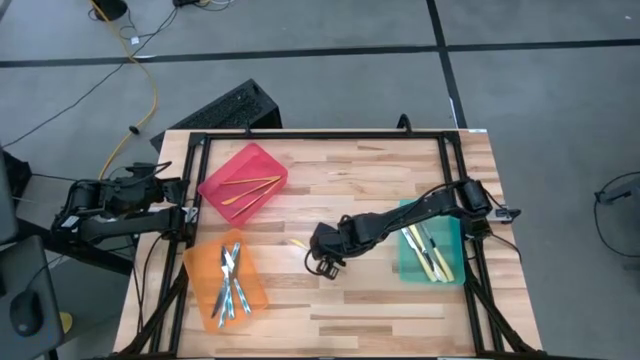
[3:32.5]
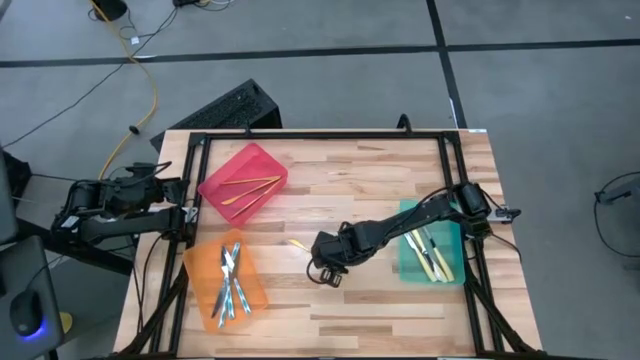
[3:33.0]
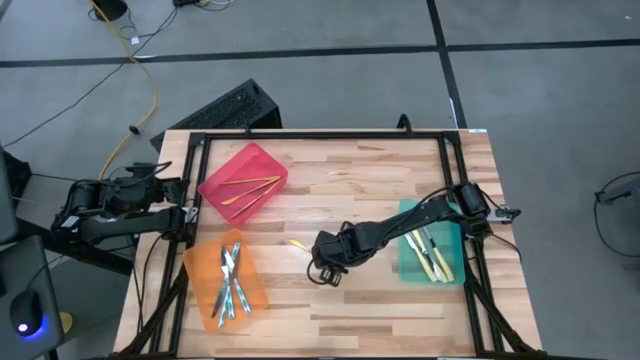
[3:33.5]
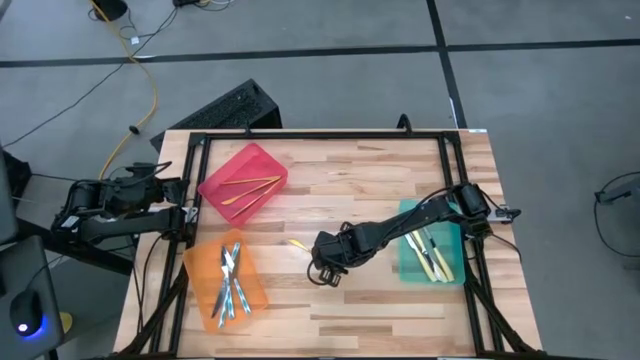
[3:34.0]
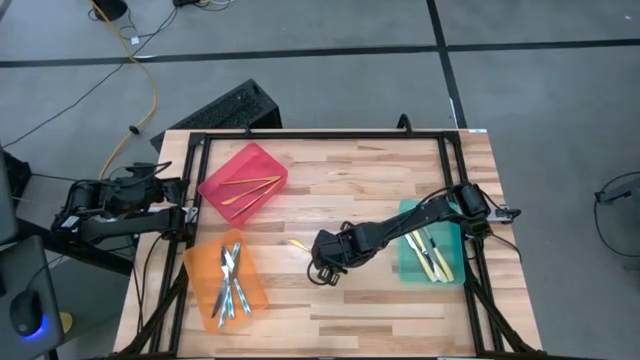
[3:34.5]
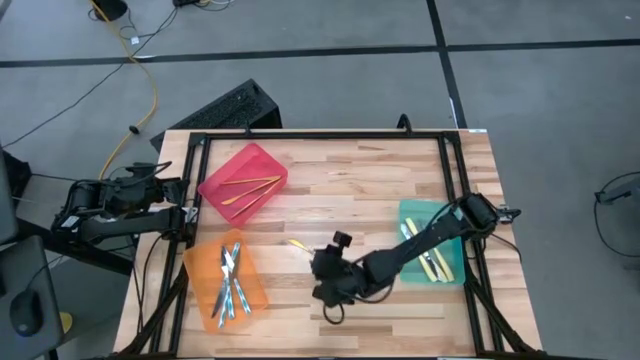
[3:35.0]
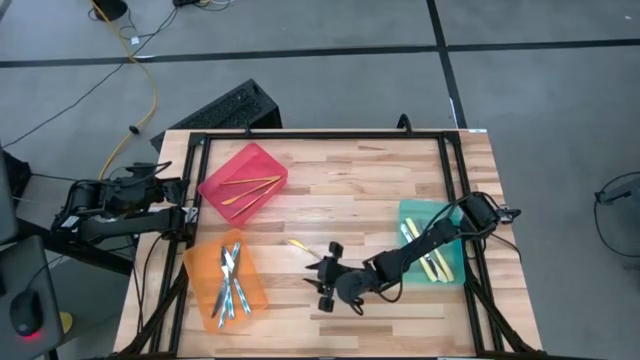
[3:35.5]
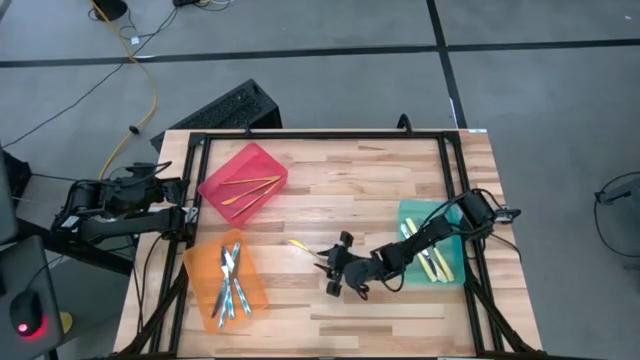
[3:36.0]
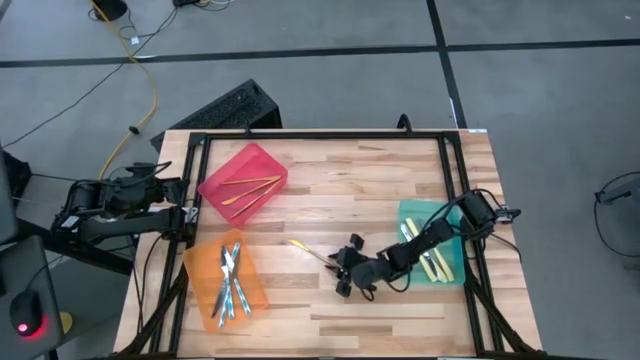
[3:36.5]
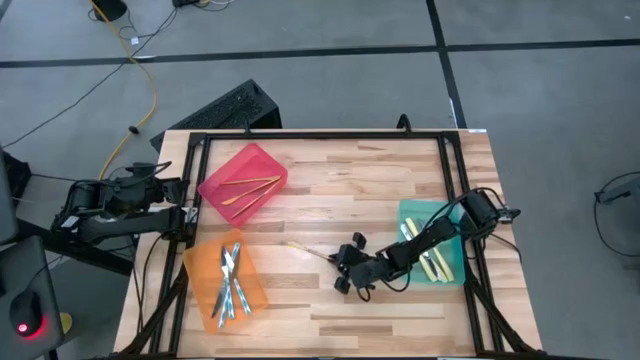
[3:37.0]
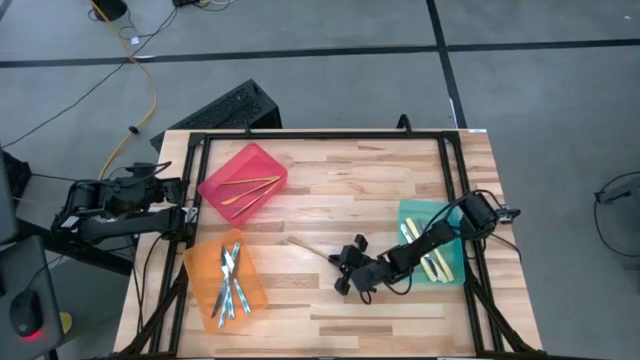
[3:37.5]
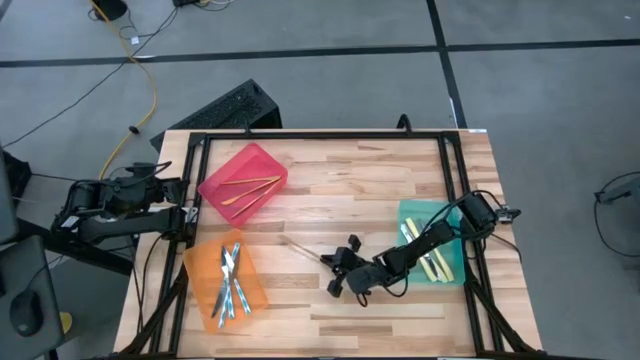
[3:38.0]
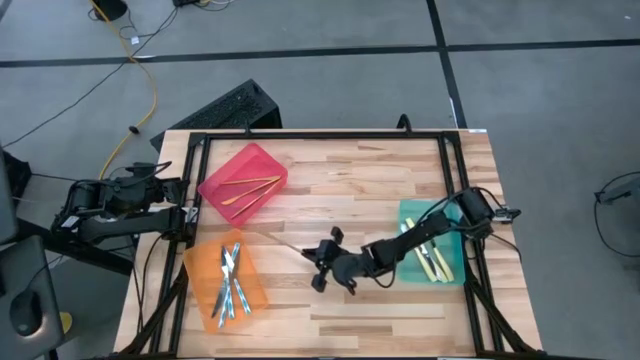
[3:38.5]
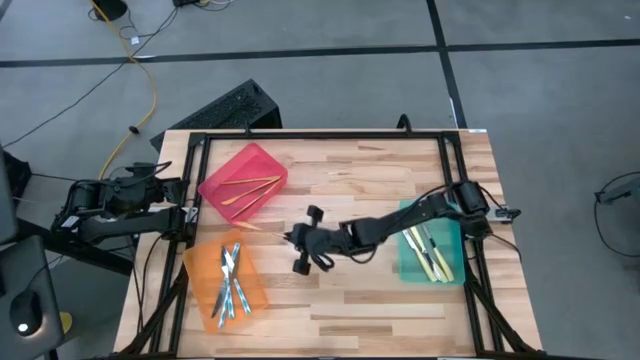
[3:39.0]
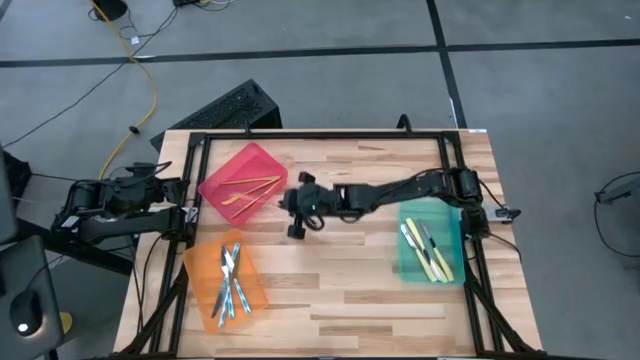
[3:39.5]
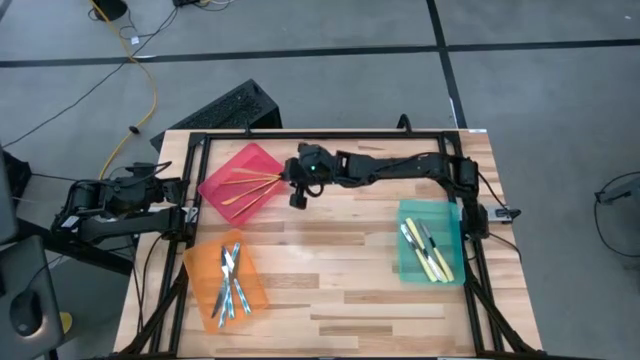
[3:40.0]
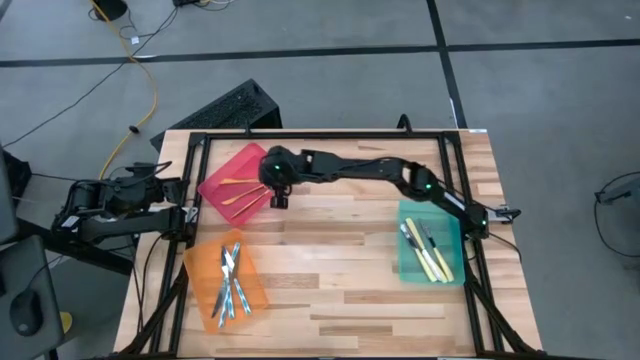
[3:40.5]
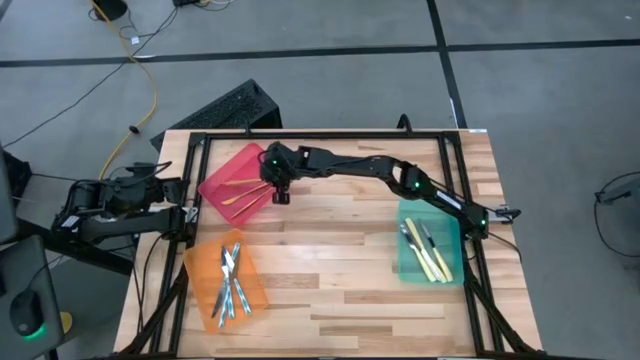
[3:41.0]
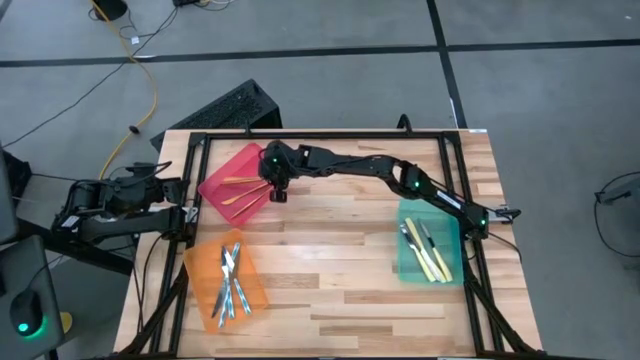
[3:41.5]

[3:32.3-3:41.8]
Task: Sort silverware by color (type)
Put the gold knife into the red bin

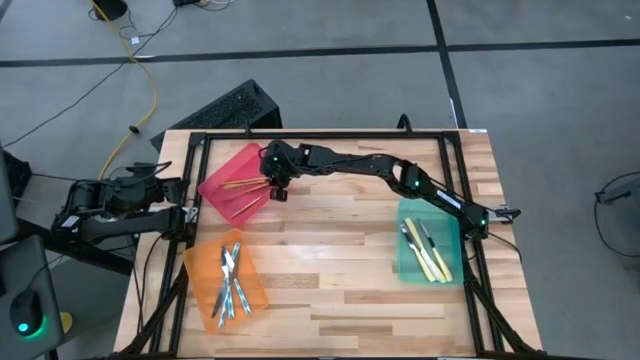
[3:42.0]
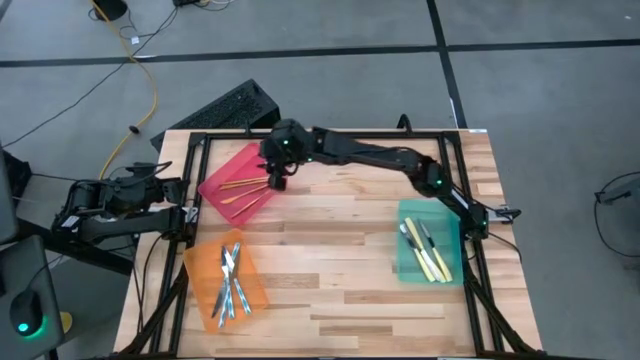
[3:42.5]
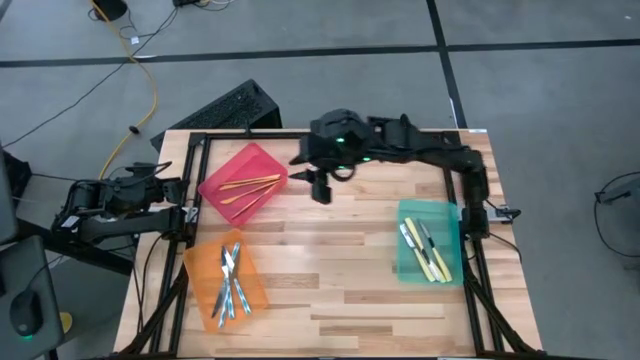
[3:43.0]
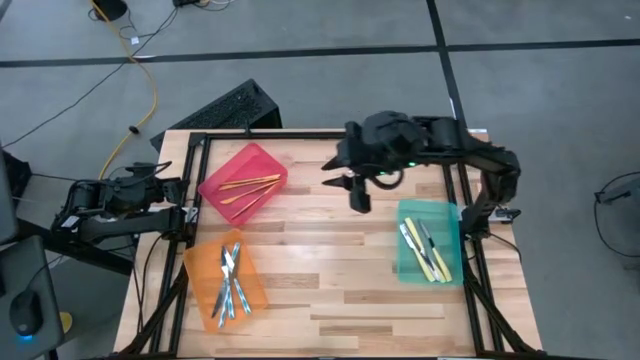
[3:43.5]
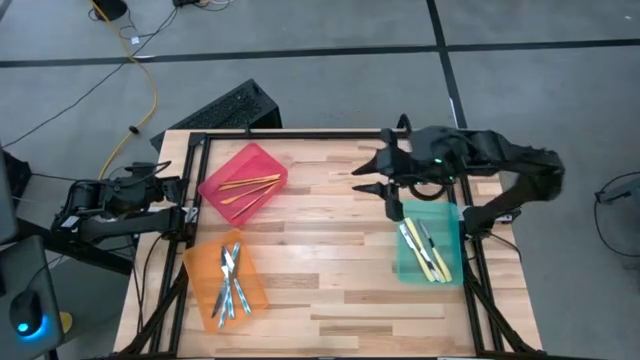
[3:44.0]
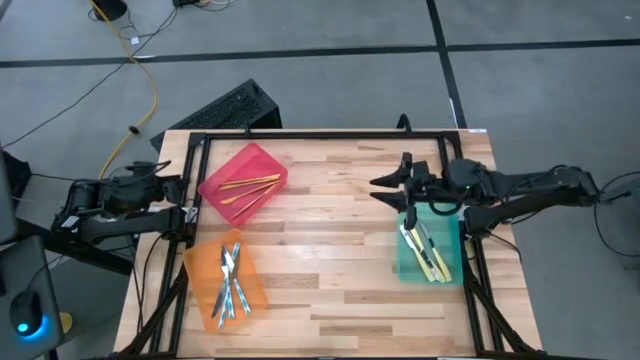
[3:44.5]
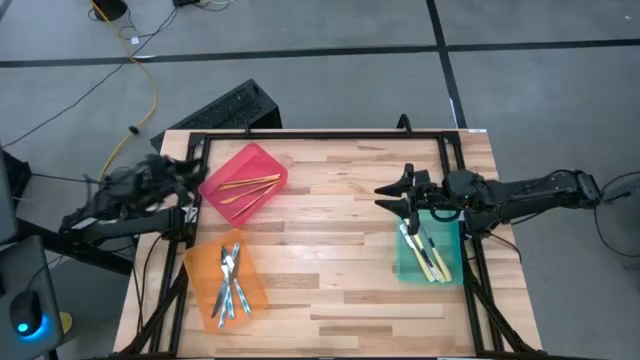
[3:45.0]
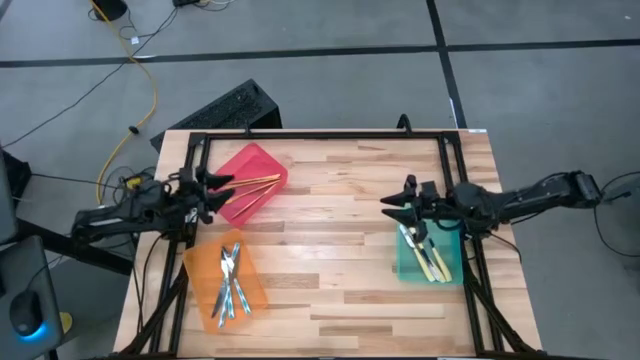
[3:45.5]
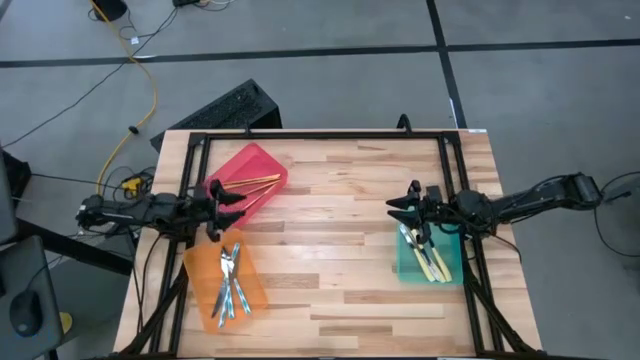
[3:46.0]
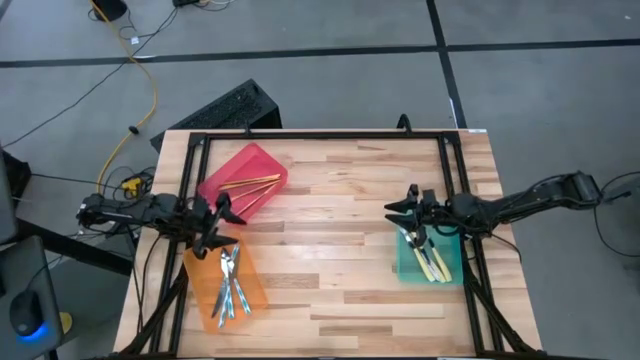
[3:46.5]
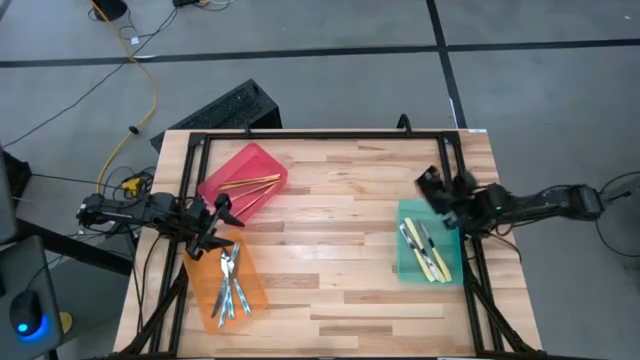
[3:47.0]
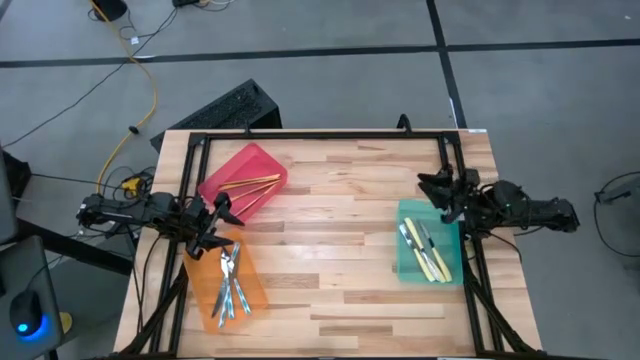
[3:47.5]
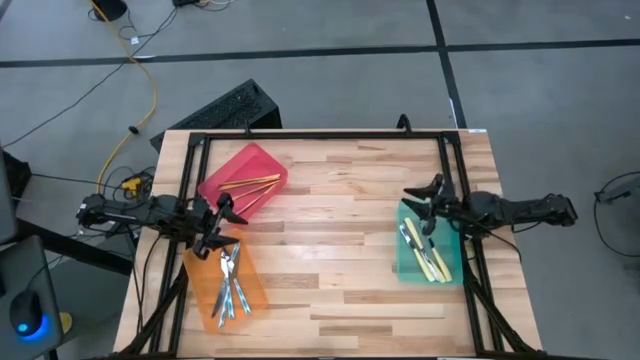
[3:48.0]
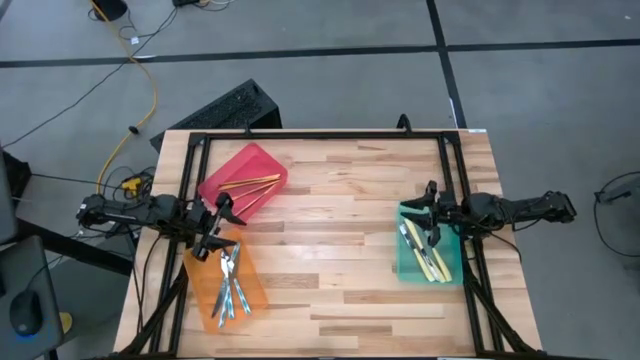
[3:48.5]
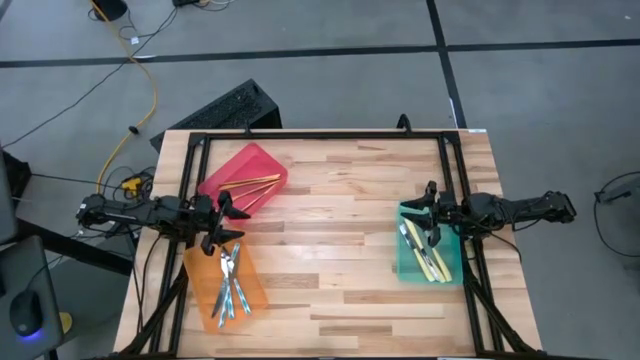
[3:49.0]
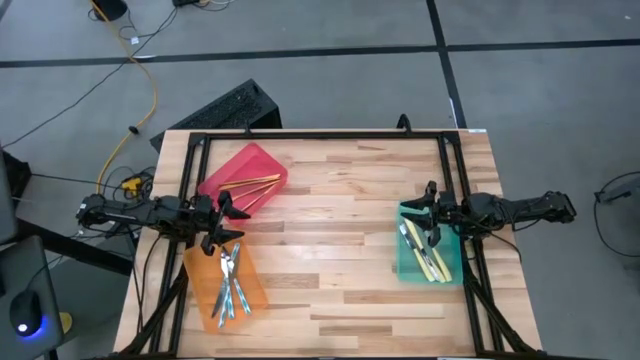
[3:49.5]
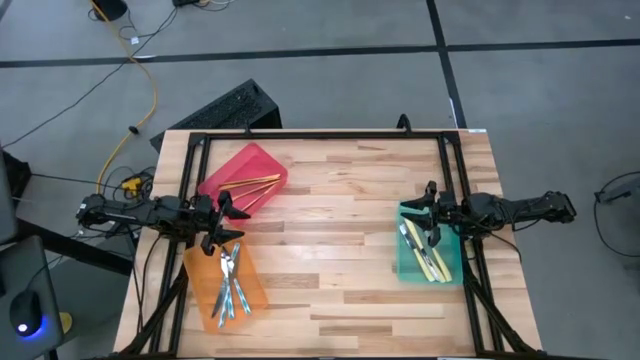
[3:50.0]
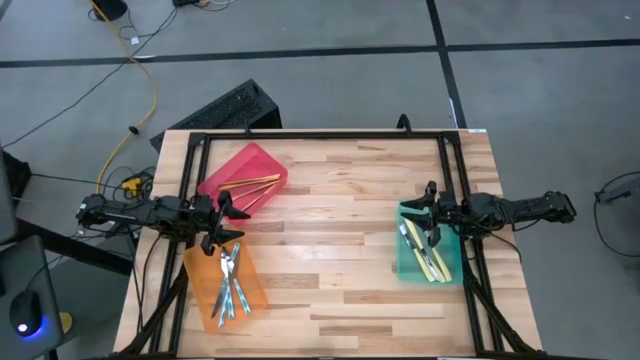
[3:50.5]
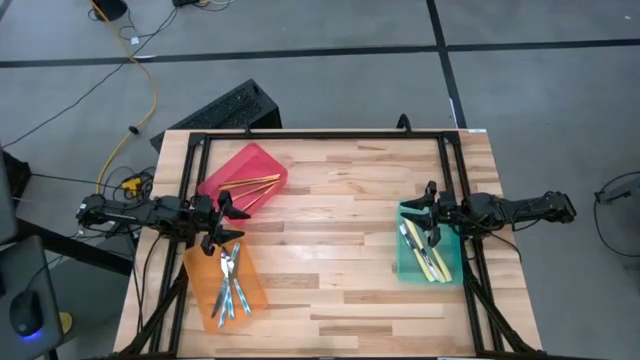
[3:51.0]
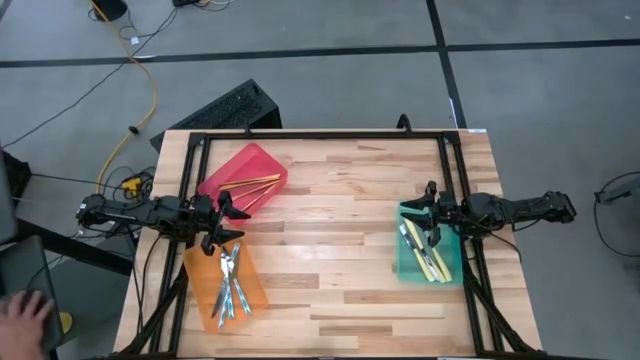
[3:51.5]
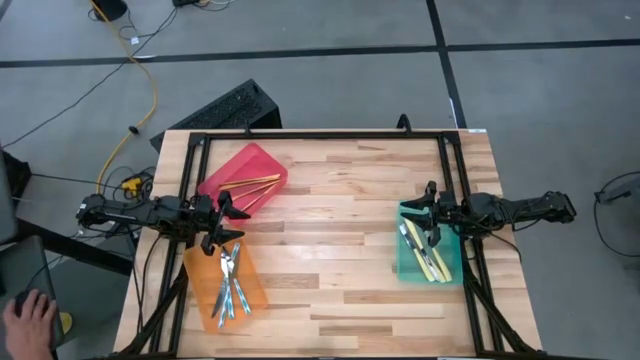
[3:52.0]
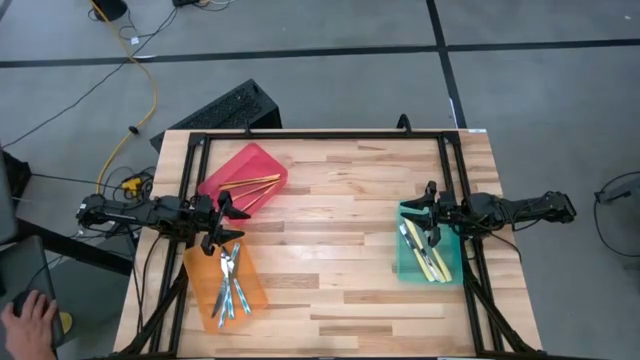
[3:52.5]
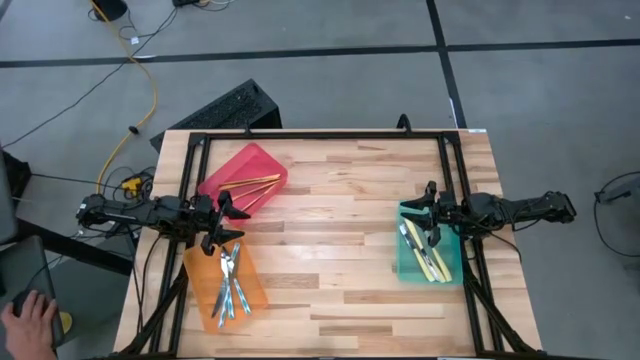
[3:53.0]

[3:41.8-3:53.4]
Return to Home Position

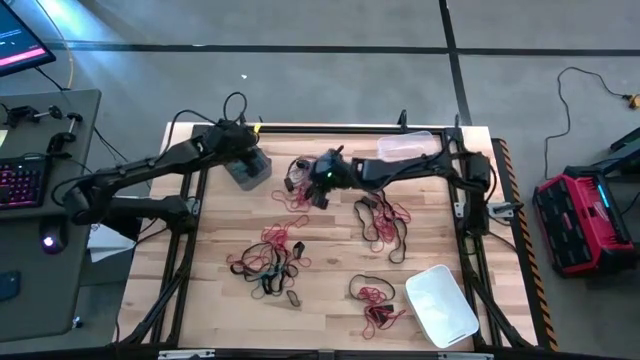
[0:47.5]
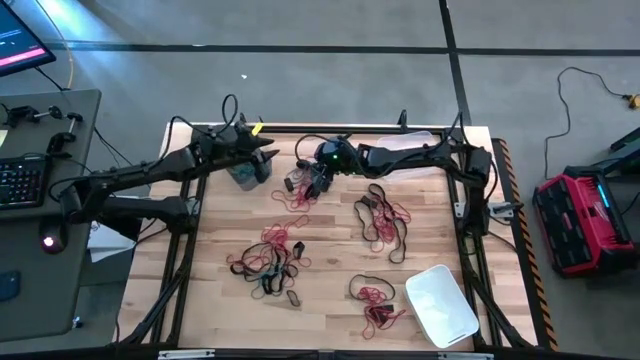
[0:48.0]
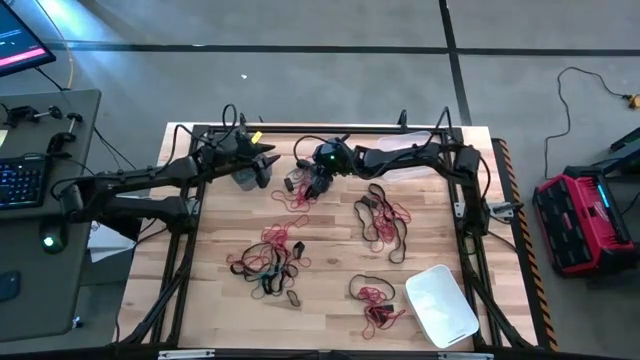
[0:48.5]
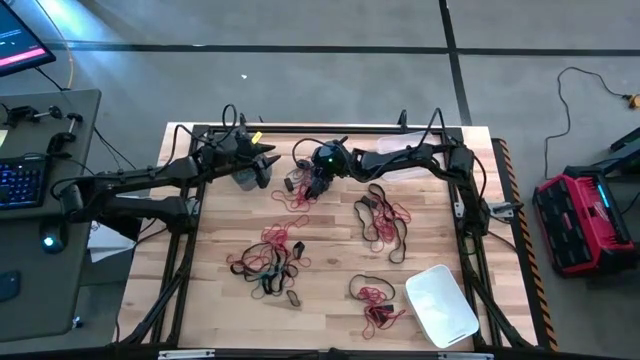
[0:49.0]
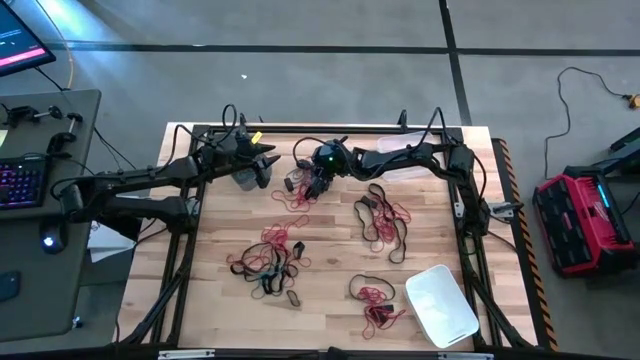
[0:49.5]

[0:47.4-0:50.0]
Task: Sort rubber bands into baskets
Put the blue rubber band into the black bin
